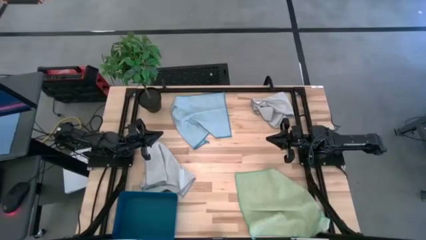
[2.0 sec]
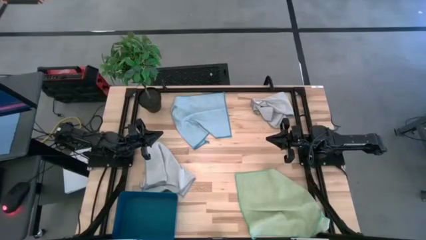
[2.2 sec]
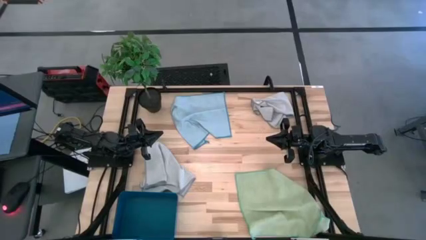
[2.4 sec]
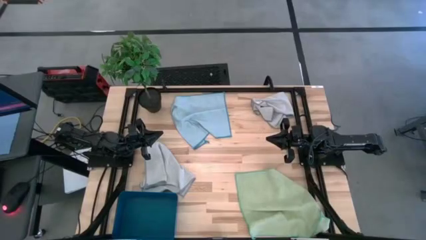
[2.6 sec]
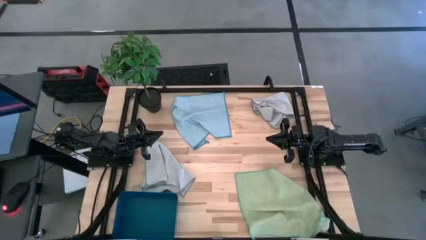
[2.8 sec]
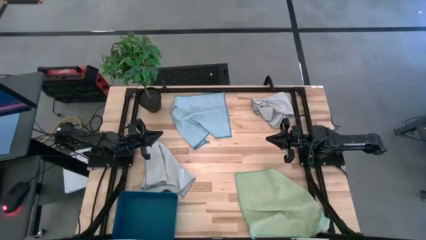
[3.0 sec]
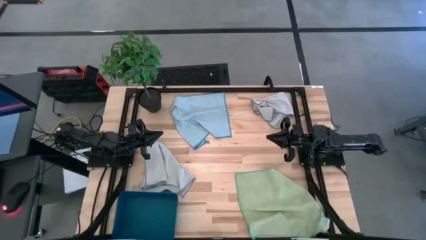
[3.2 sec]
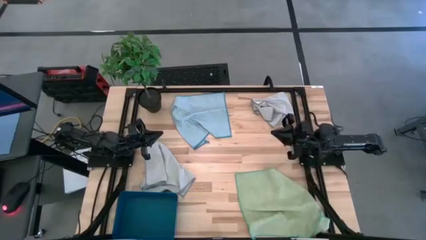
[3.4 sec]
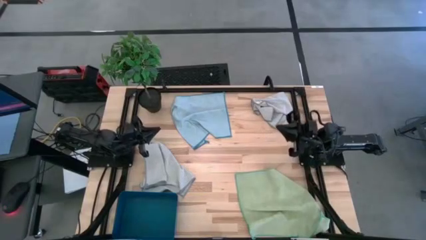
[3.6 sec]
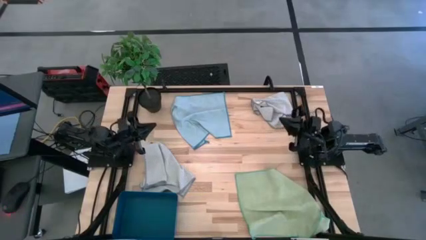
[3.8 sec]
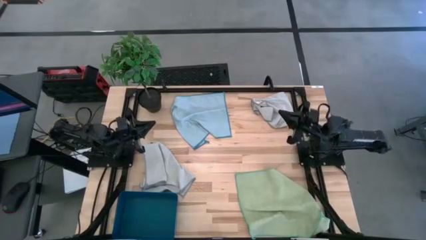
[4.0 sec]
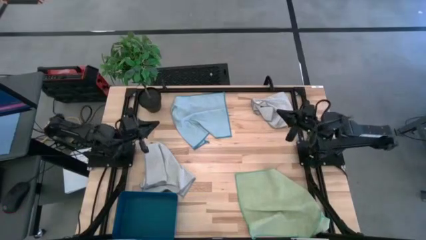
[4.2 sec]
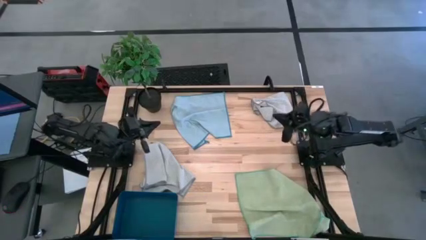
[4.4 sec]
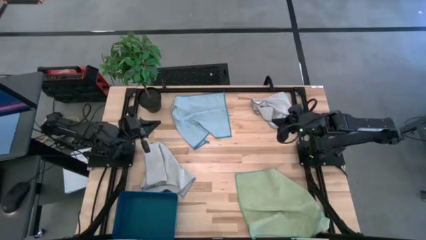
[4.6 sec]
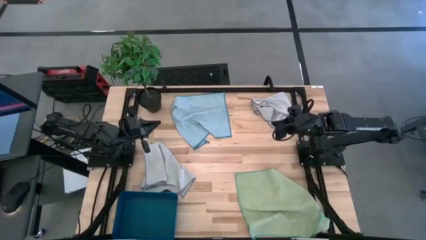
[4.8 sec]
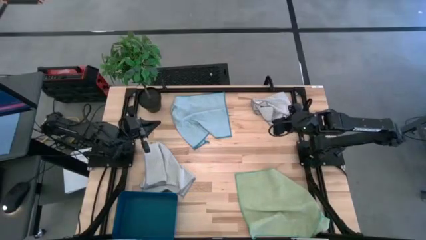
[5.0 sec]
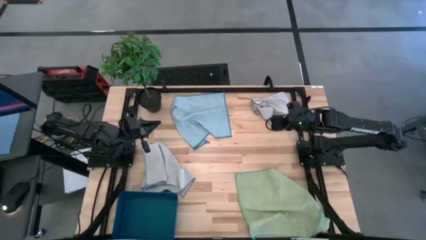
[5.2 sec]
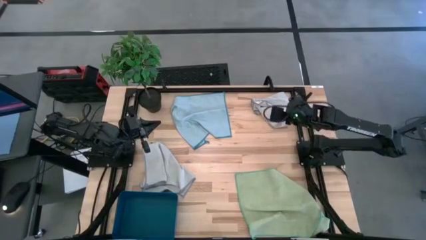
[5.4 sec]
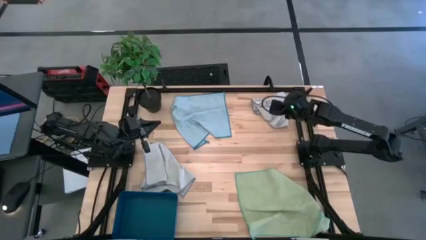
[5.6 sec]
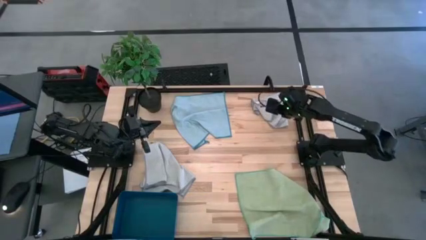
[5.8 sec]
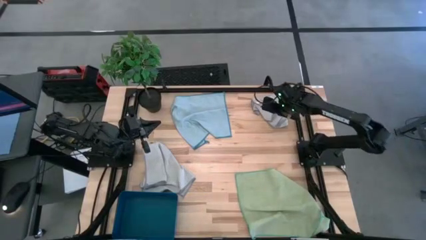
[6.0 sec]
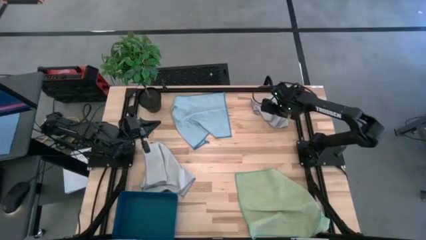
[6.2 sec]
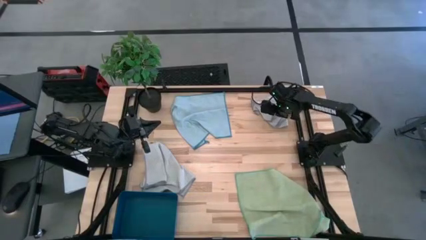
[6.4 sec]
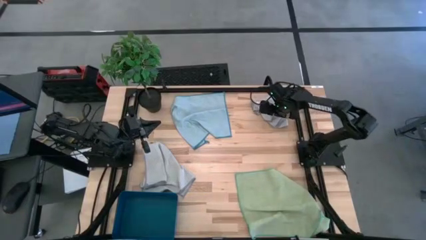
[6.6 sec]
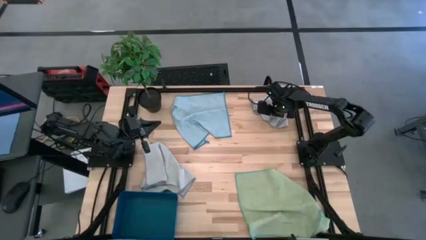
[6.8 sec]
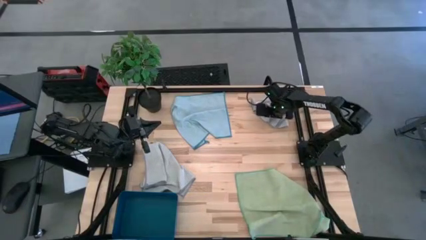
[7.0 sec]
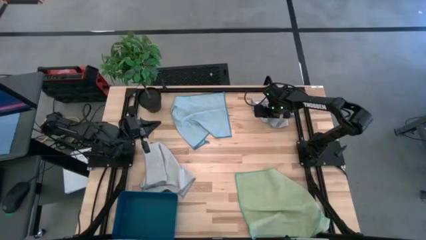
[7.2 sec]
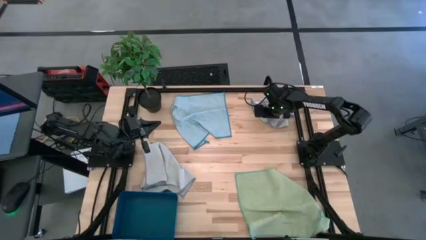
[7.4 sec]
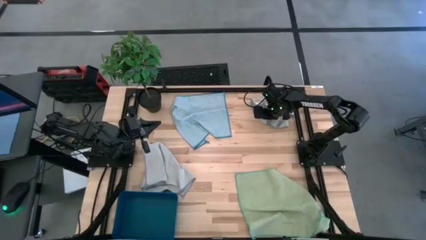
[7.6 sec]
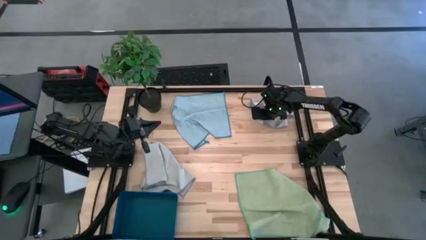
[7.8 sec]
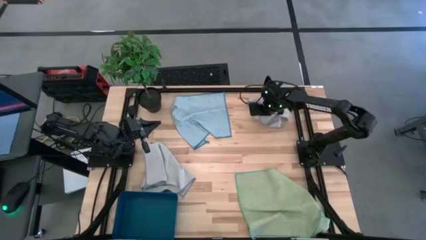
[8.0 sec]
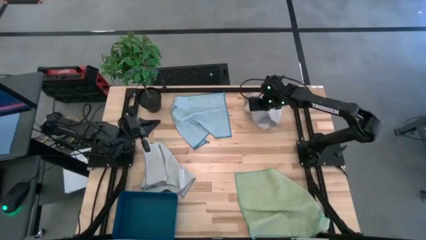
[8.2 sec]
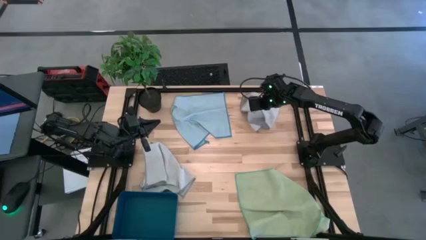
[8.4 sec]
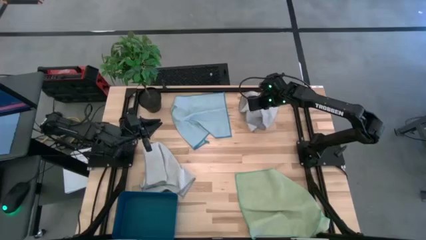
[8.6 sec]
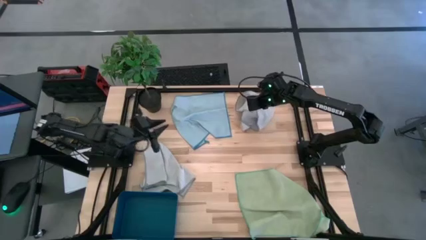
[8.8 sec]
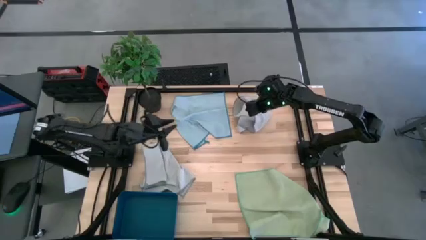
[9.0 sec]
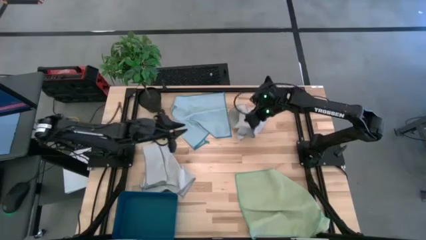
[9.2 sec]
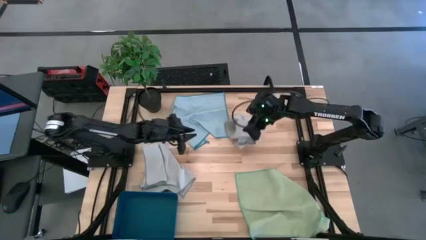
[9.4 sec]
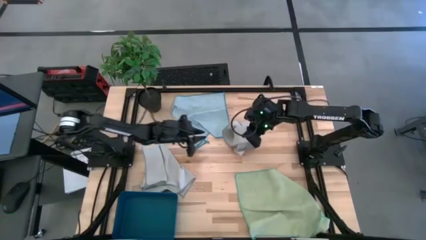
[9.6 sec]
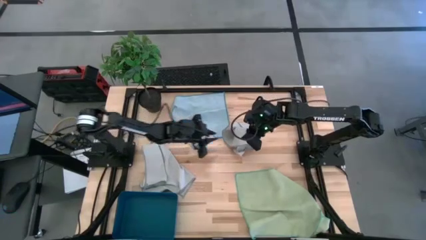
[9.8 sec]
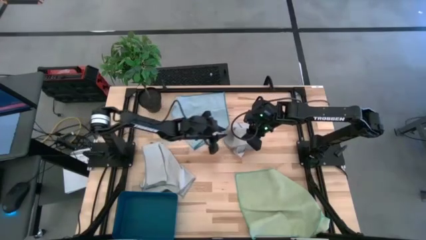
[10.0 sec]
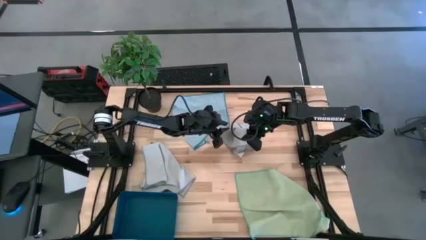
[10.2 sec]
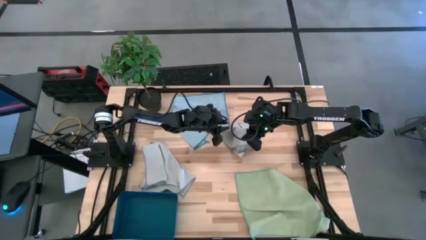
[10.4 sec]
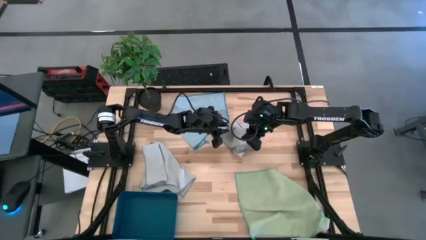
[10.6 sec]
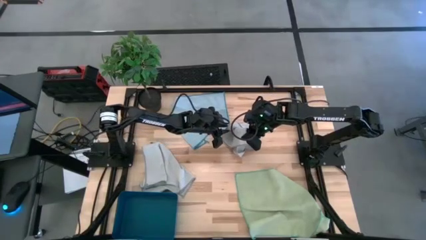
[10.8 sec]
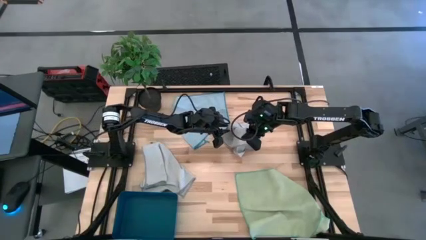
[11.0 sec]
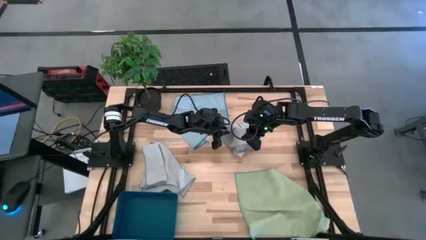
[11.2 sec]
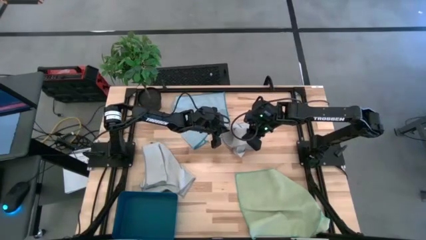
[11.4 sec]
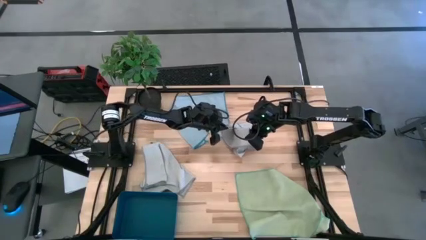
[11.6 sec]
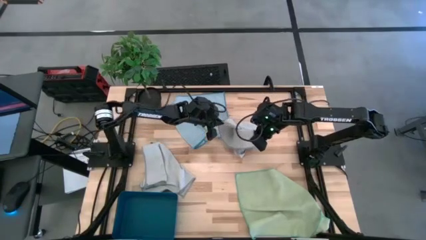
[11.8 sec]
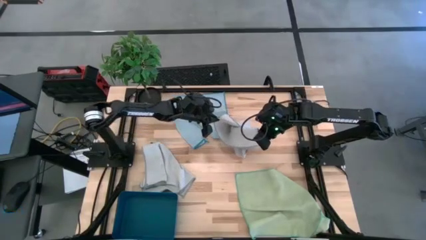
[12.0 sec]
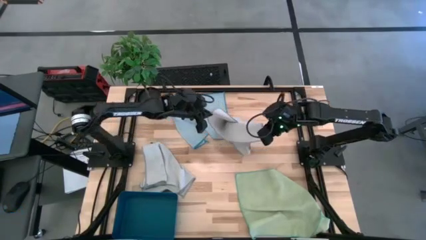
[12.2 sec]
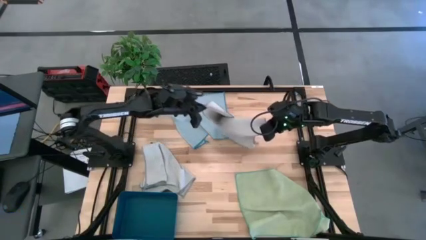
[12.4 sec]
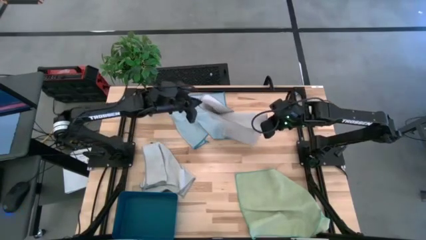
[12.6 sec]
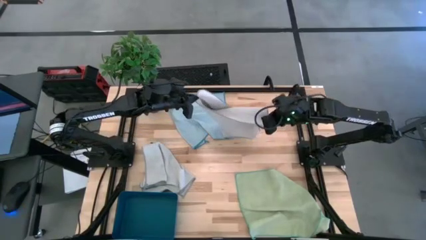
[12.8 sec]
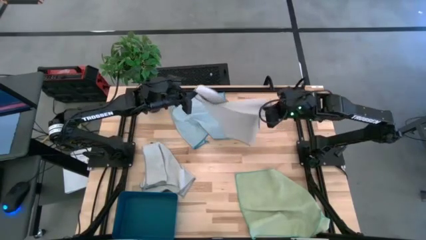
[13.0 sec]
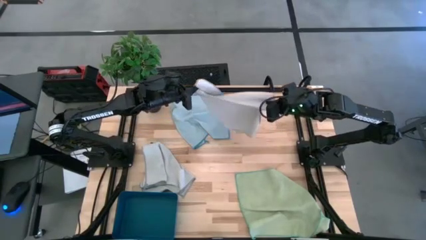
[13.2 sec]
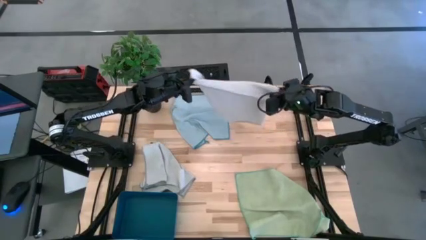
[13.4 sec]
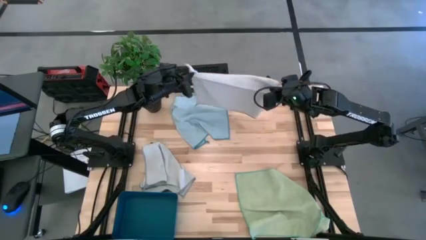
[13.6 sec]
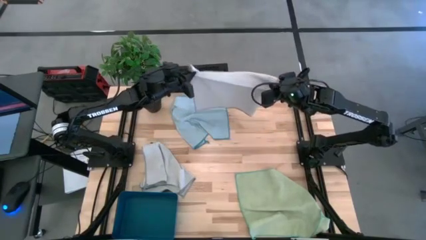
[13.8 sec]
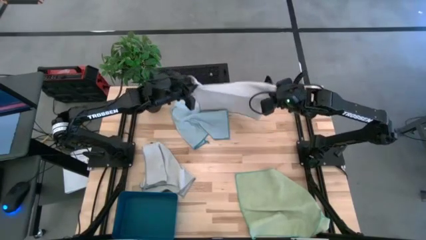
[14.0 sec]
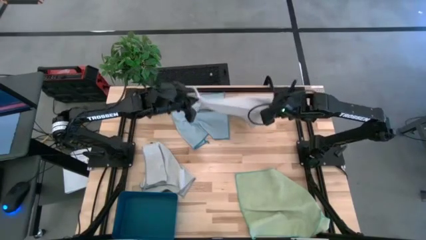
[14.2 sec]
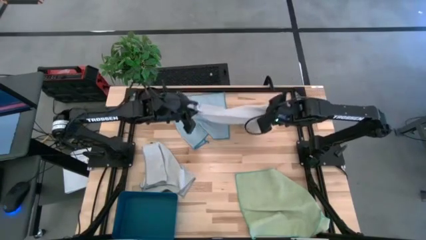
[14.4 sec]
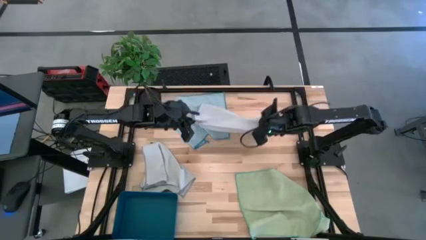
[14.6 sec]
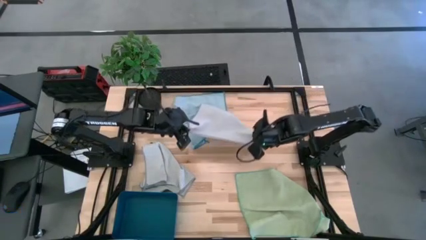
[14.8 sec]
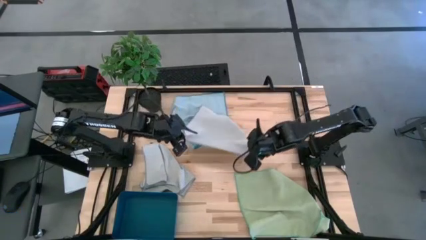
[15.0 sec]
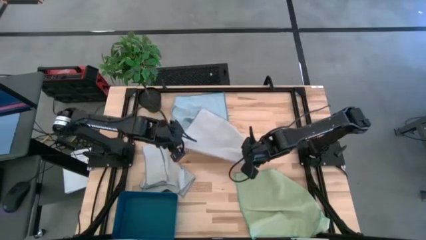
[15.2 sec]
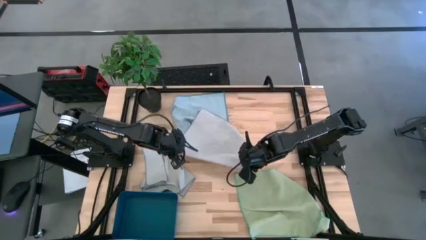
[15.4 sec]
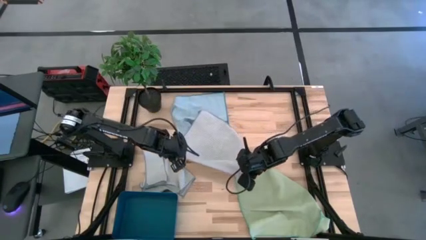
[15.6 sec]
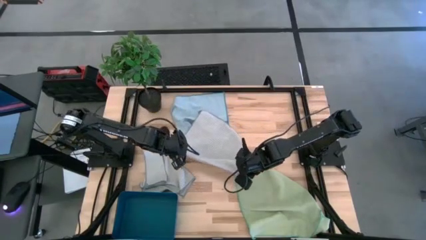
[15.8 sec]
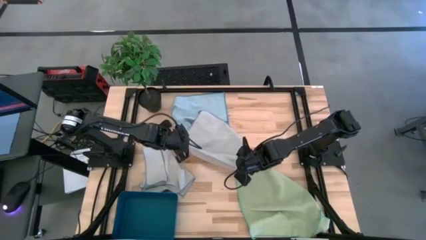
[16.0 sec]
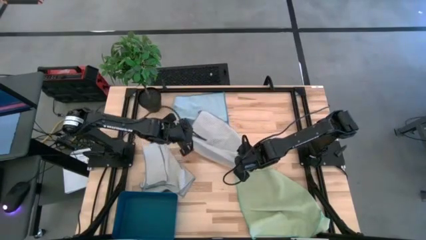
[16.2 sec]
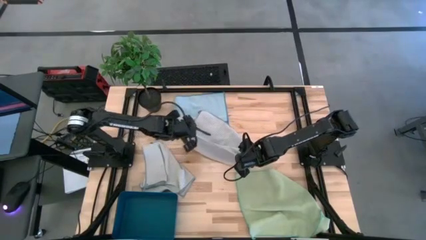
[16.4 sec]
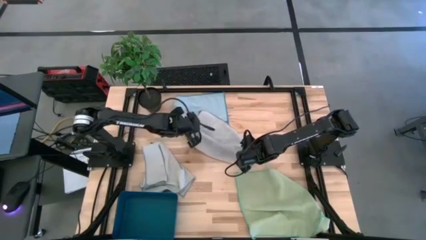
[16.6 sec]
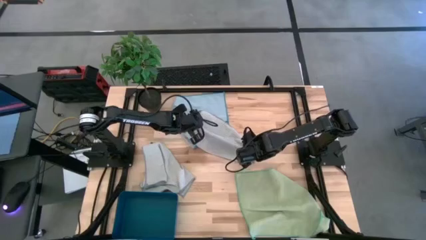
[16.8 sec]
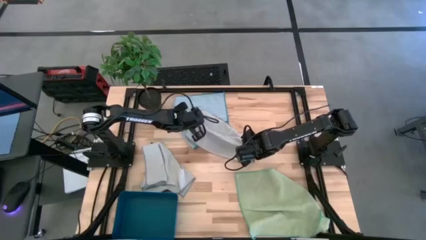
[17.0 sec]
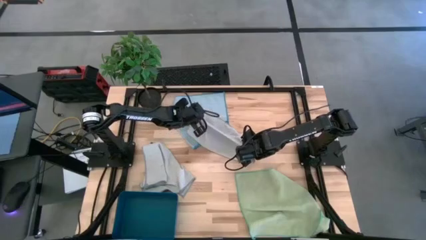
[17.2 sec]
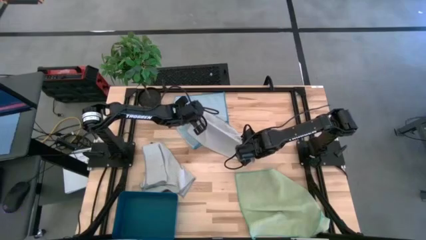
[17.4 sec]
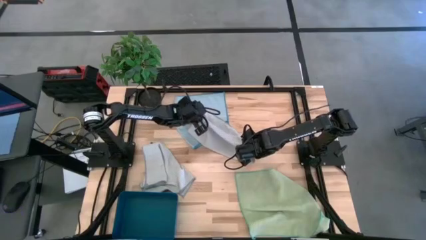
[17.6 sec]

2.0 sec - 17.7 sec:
Task: Fold microfiber towels
Fold the gray microfiber towel
